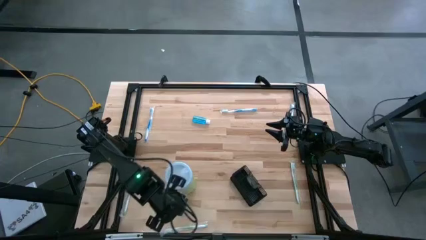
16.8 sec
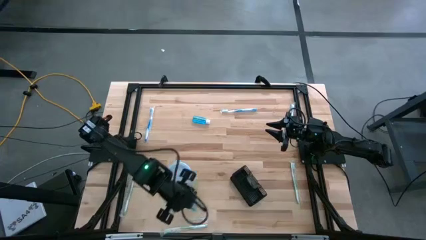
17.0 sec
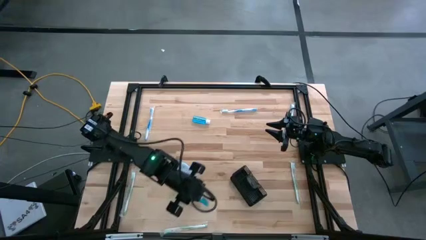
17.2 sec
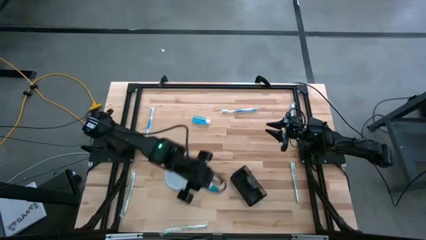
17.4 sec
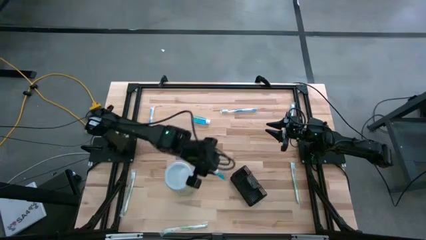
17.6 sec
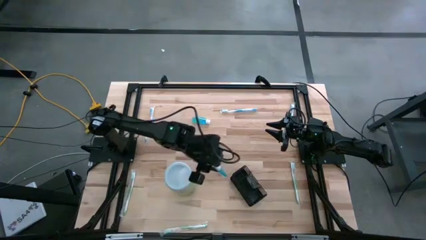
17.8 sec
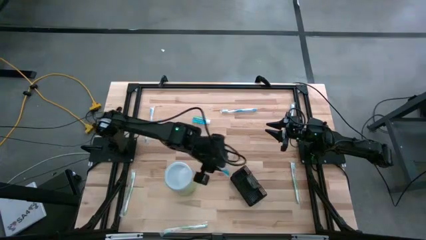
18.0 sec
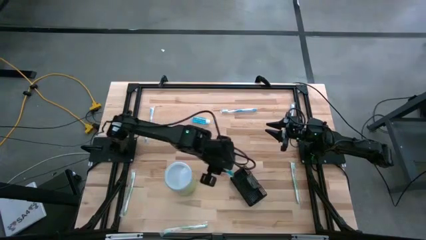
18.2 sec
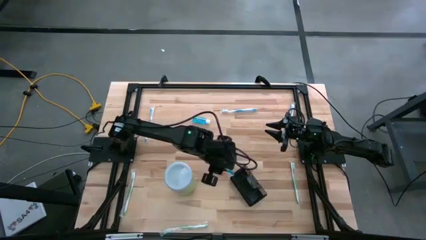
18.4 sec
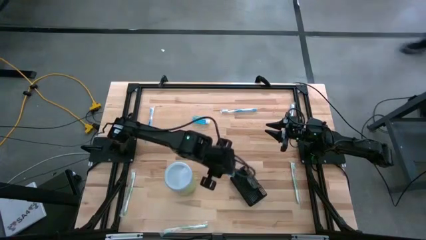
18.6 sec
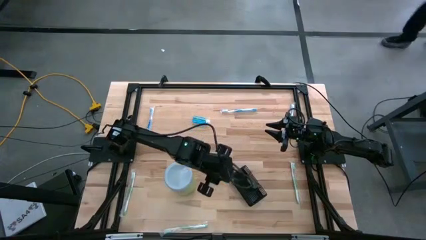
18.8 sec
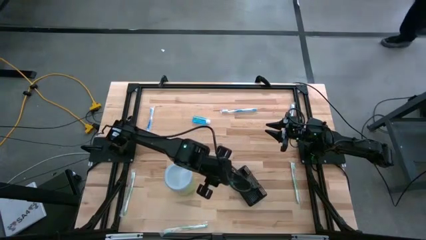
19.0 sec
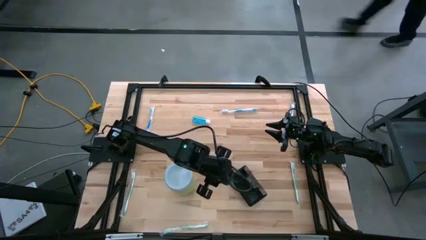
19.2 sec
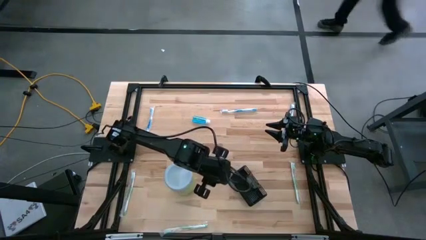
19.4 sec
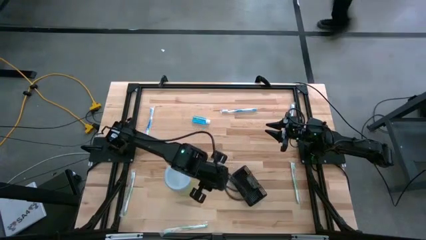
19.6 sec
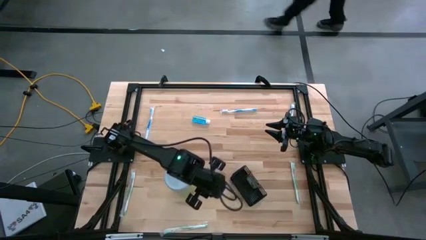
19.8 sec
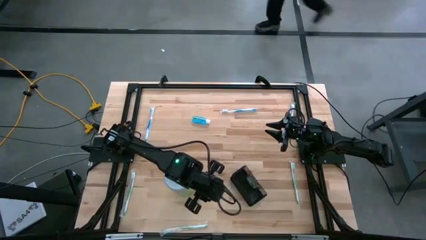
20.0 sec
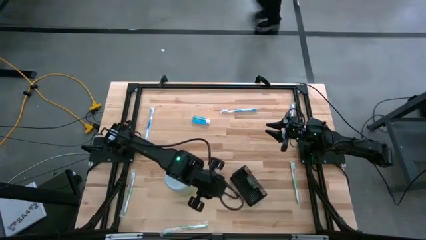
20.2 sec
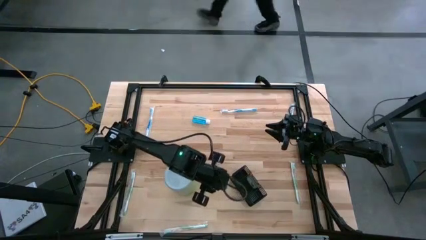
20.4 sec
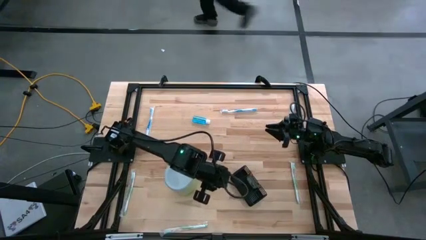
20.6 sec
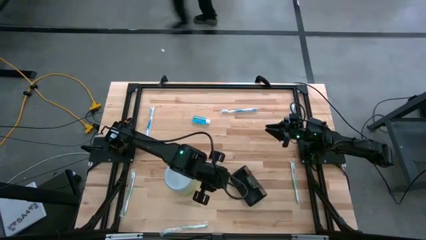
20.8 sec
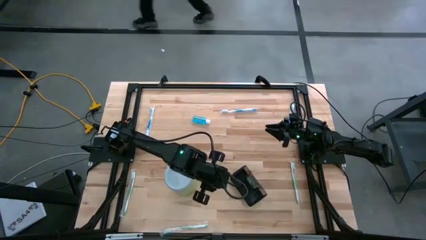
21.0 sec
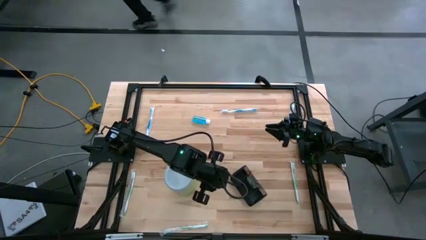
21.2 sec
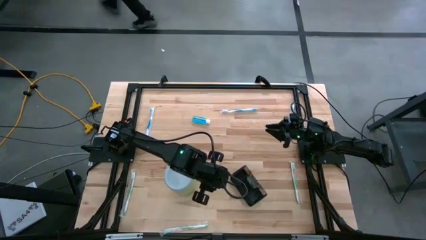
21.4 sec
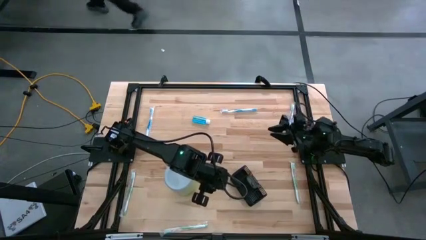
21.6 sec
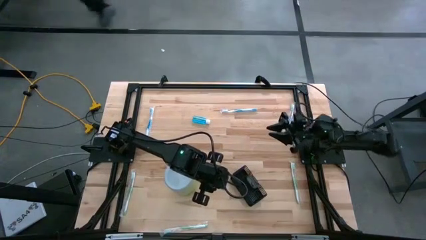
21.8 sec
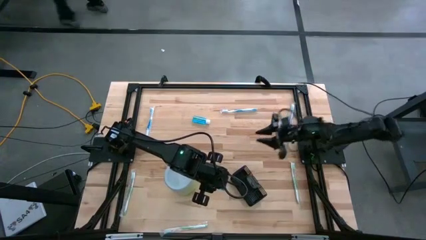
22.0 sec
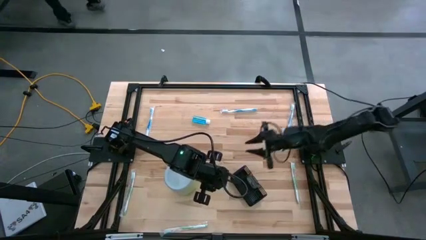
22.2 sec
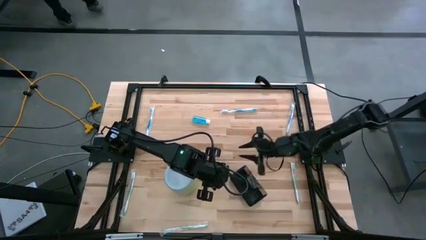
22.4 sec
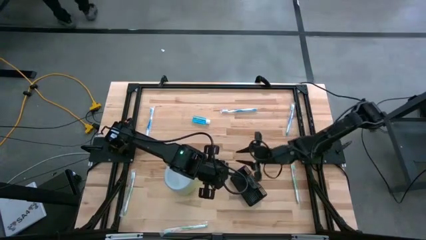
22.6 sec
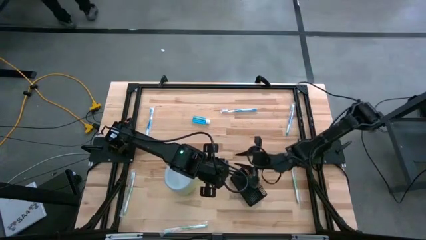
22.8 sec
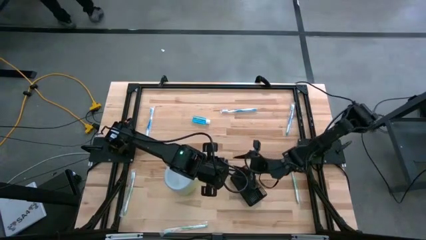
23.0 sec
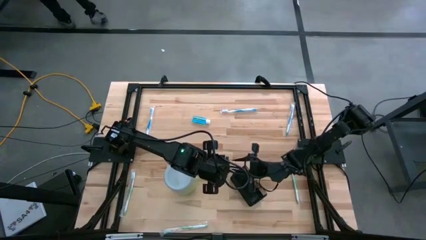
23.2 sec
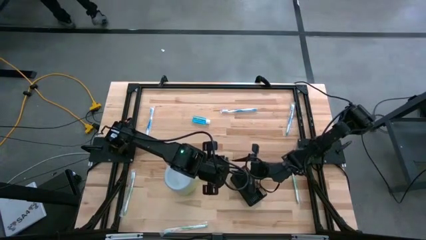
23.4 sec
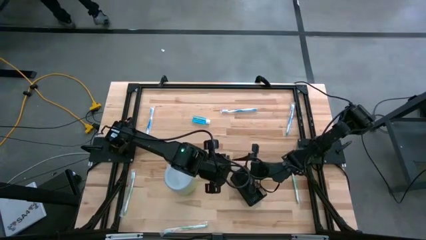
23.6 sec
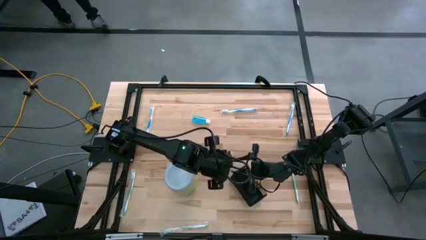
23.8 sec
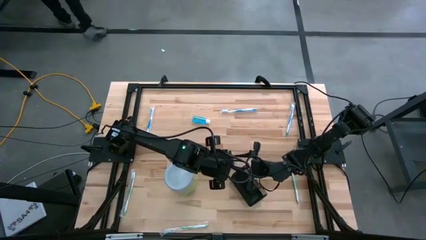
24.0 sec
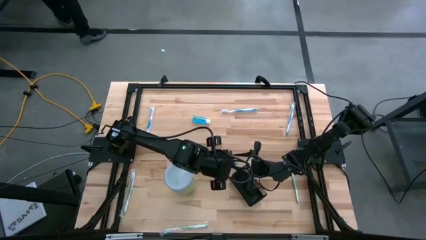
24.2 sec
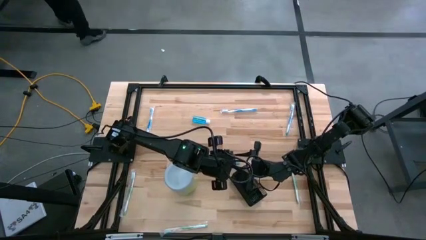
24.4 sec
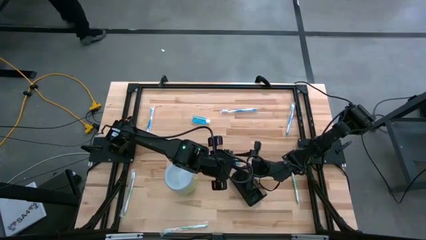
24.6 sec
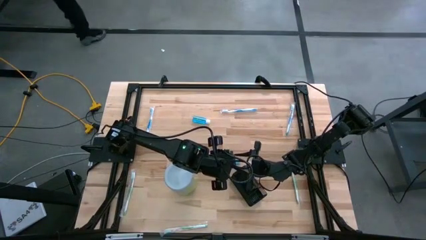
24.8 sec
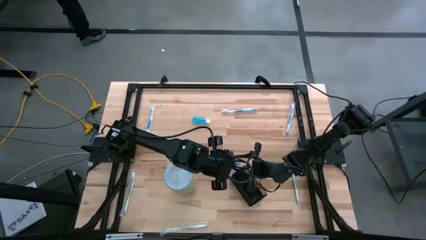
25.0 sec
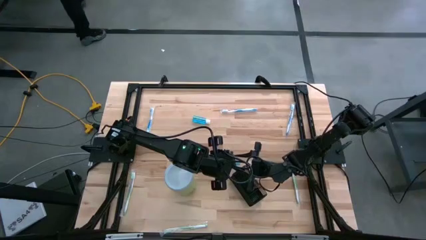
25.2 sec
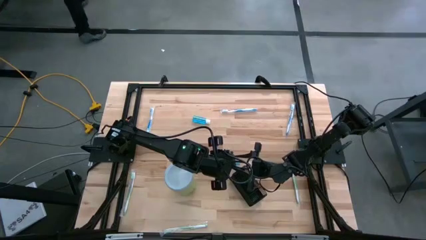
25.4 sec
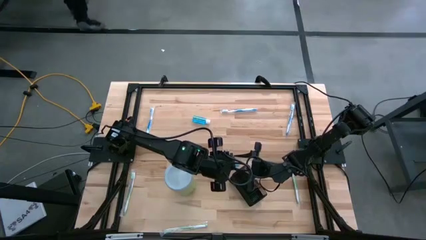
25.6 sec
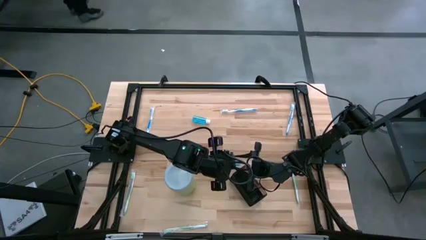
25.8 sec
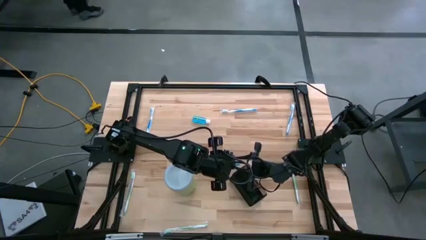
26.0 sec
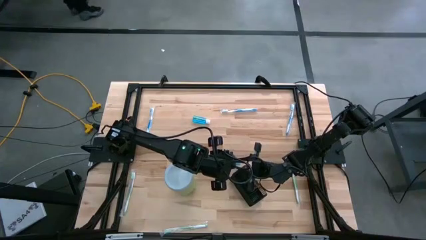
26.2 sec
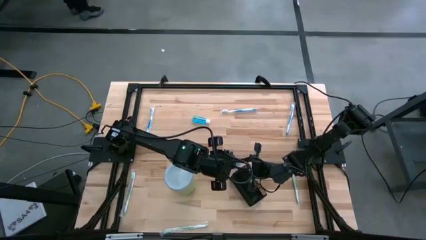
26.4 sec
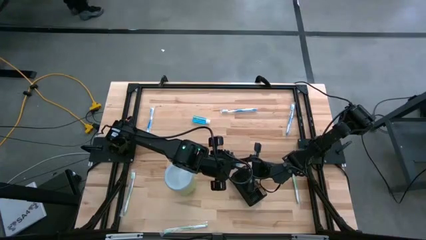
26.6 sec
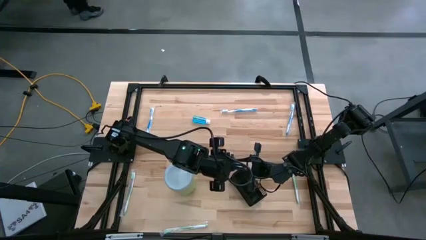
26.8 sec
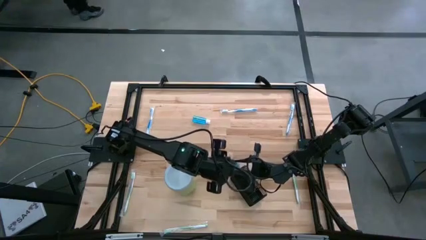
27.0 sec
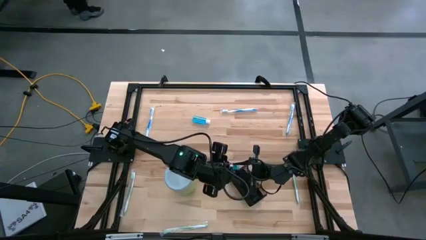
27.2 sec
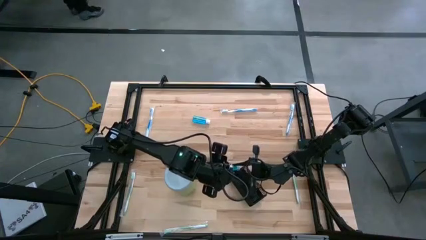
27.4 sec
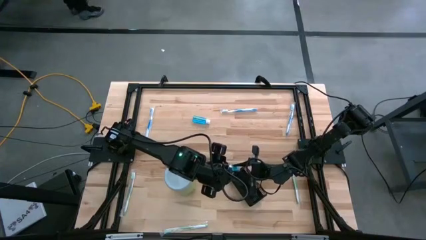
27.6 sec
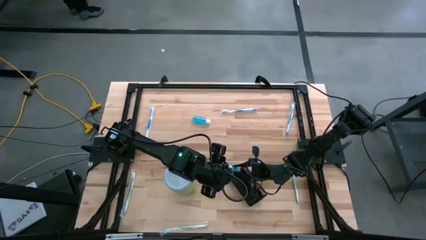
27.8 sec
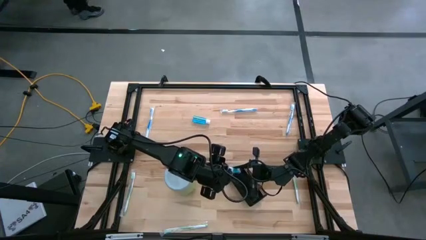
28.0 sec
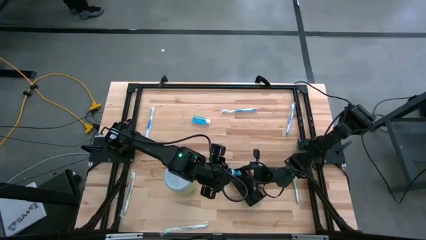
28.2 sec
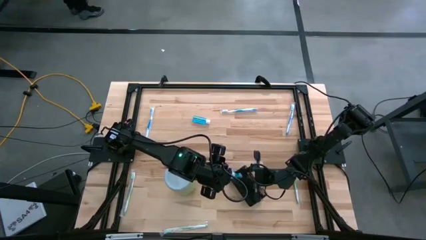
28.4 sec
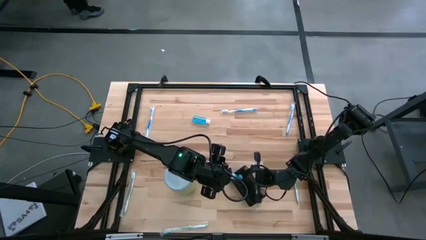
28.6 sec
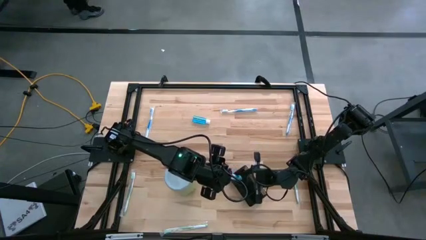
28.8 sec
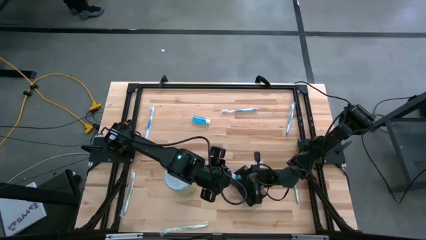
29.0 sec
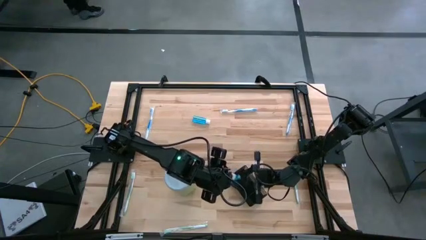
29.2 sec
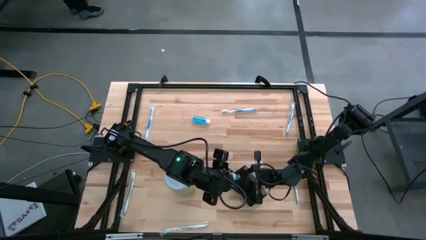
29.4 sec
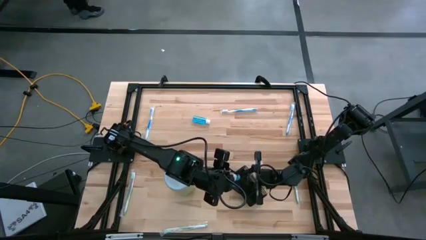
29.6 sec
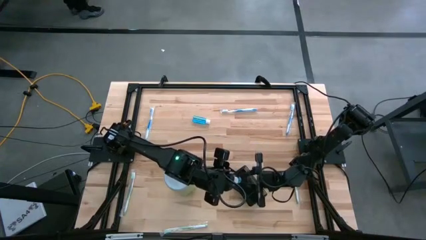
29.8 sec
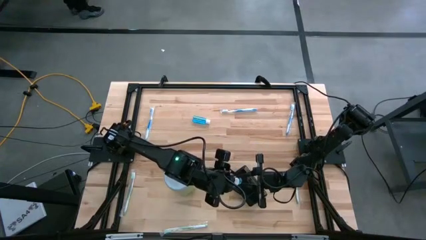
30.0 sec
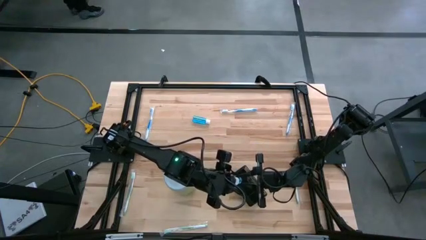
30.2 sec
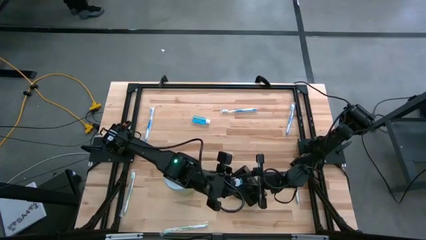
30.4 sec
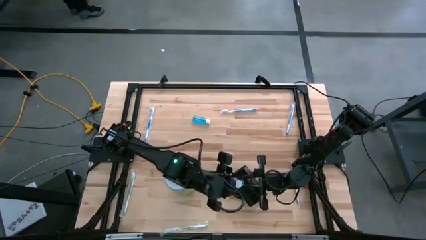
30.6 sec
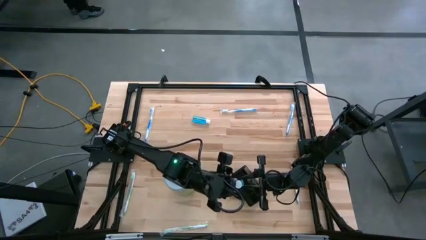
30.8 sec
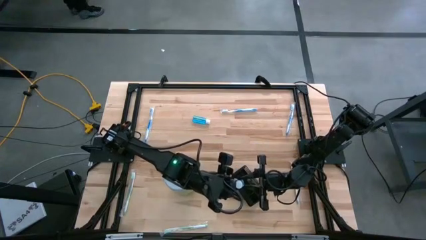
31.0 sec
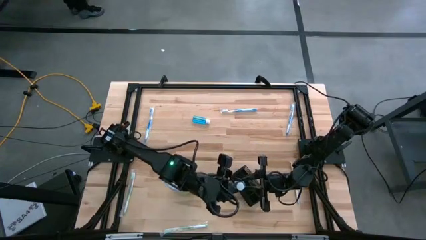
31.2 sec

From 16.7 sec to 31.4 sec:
Task: Pick & Place toothbrushing station
Put the bottom blue mouthwash into the black mesh organizer
